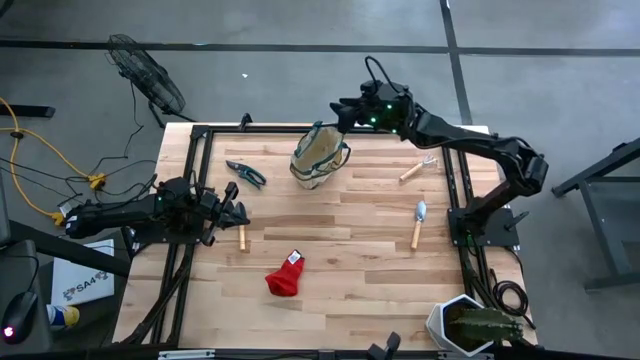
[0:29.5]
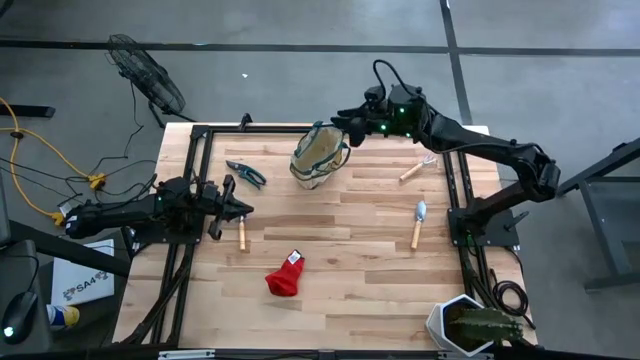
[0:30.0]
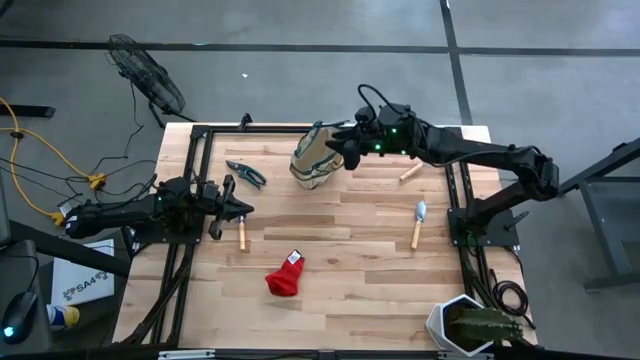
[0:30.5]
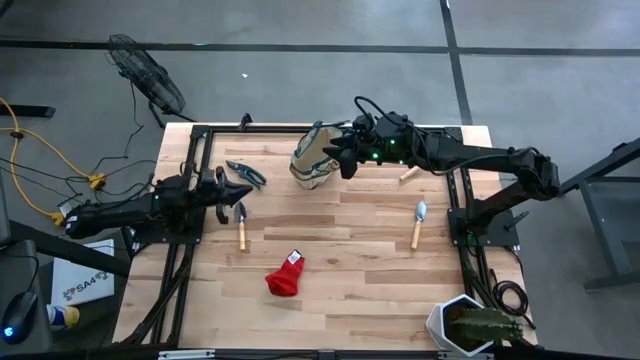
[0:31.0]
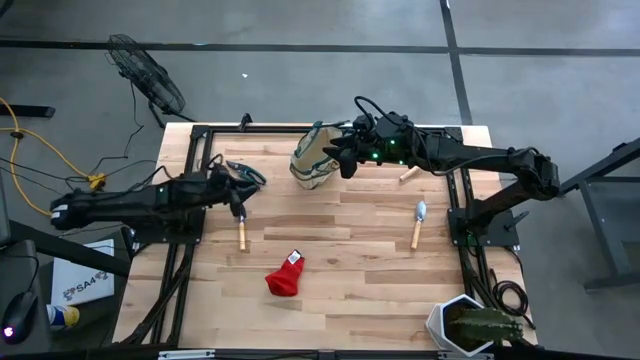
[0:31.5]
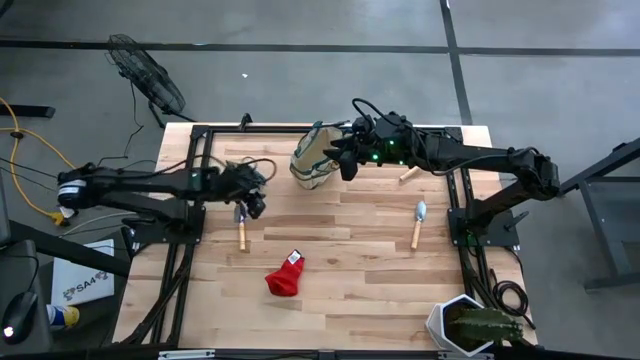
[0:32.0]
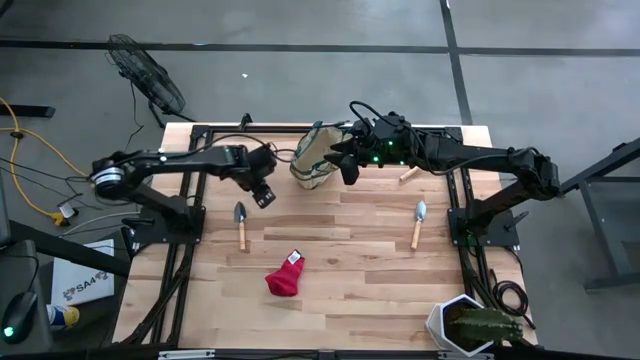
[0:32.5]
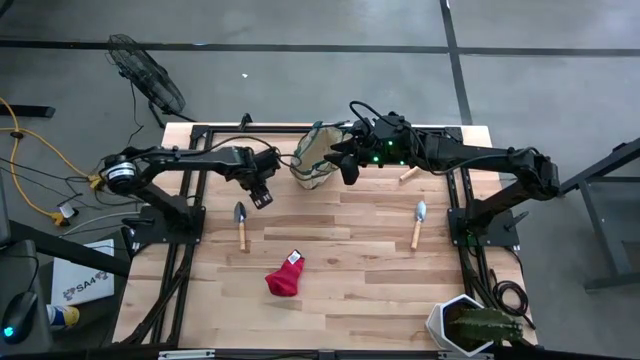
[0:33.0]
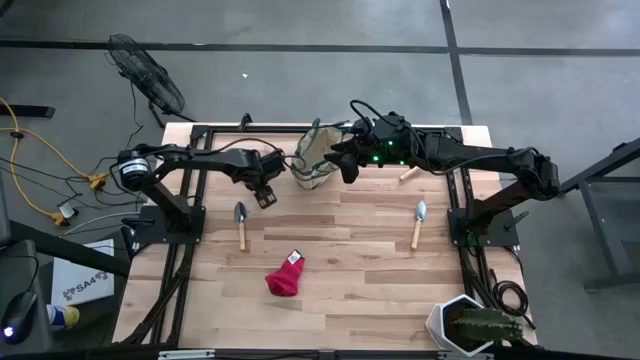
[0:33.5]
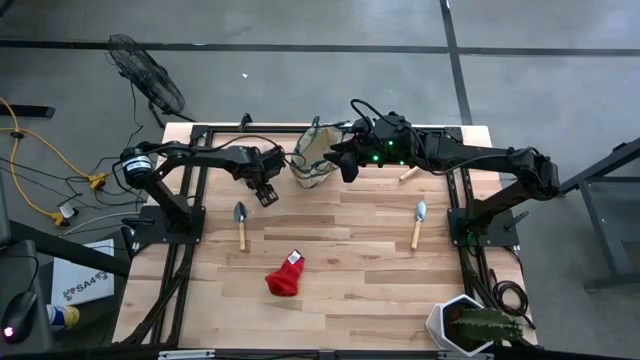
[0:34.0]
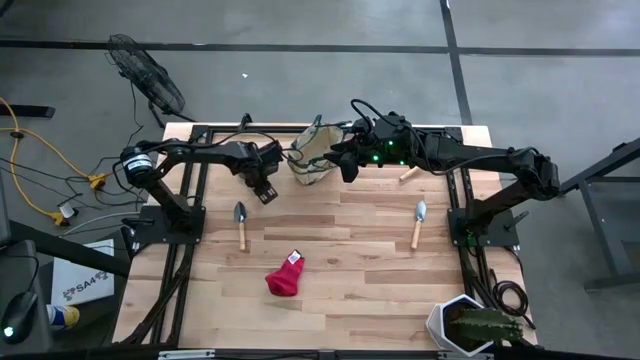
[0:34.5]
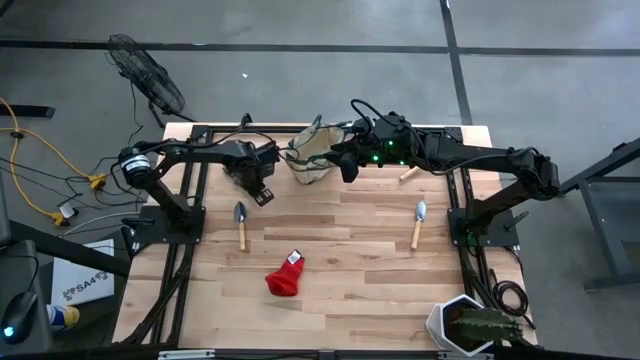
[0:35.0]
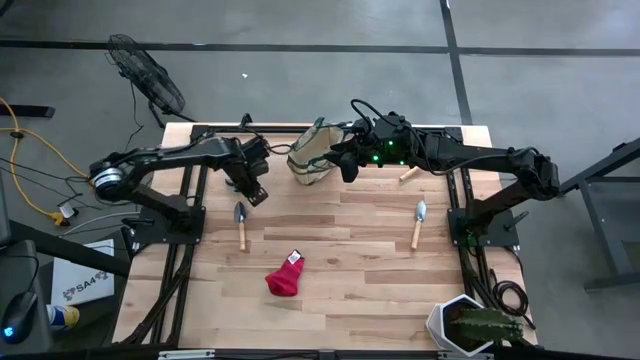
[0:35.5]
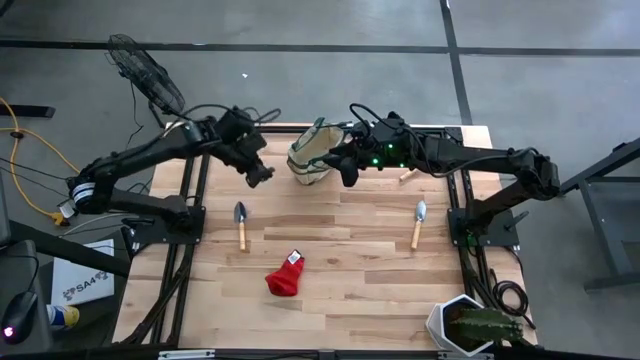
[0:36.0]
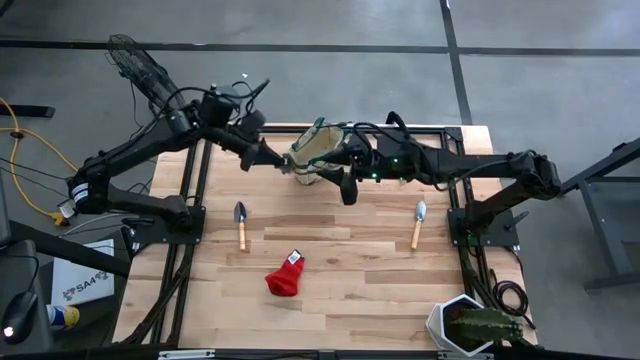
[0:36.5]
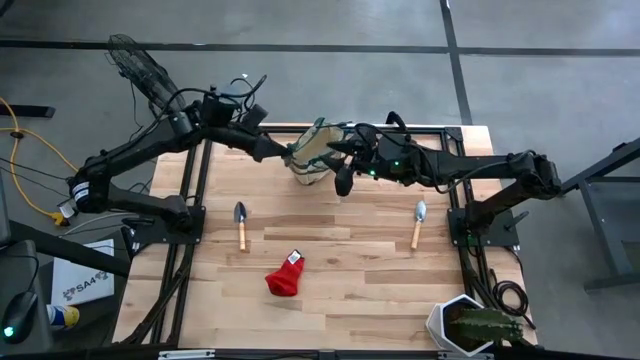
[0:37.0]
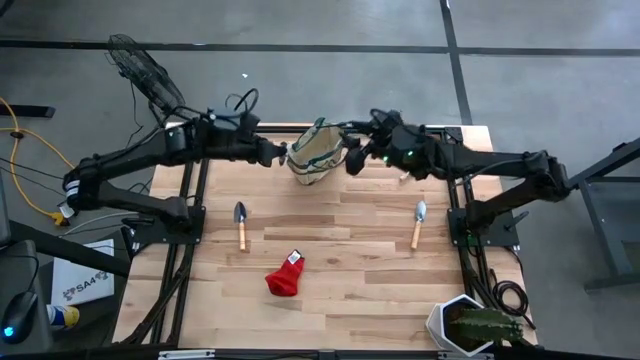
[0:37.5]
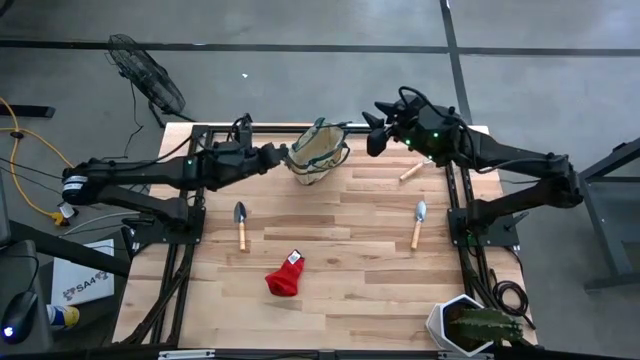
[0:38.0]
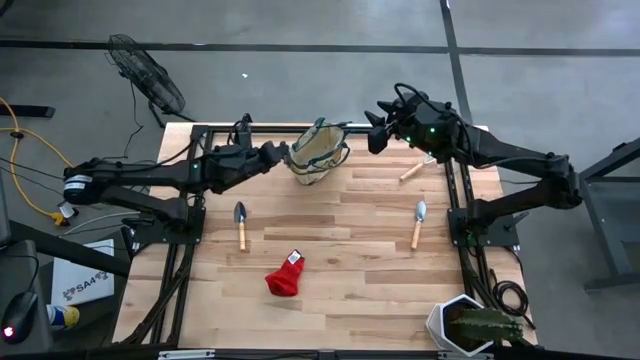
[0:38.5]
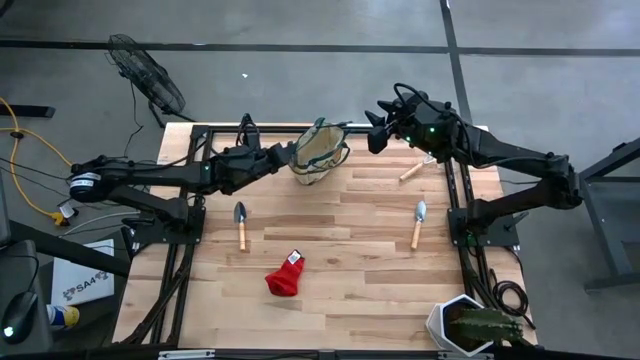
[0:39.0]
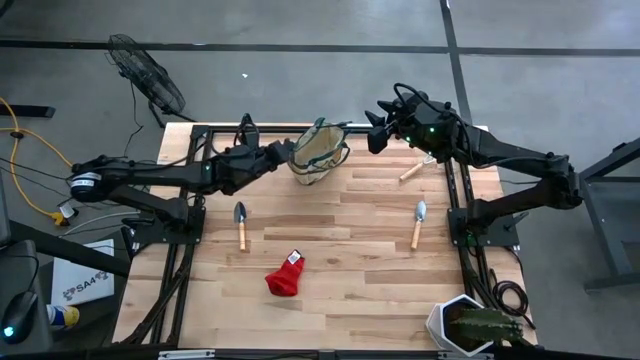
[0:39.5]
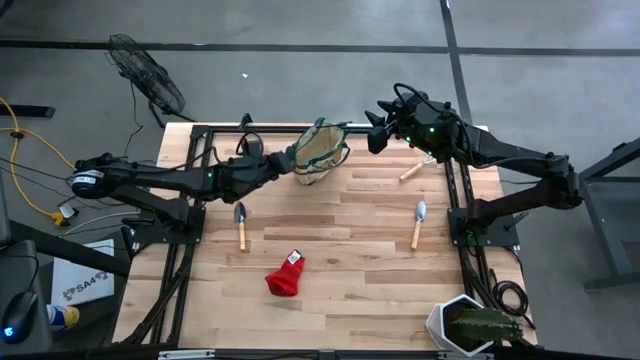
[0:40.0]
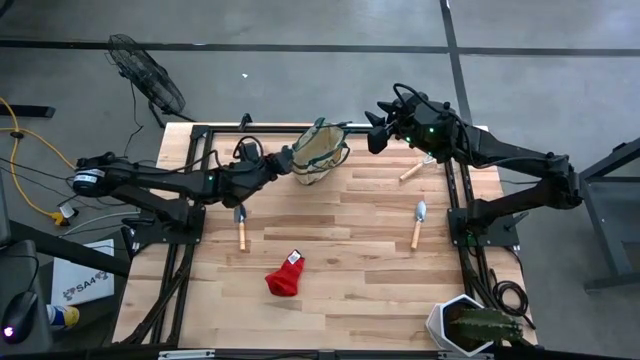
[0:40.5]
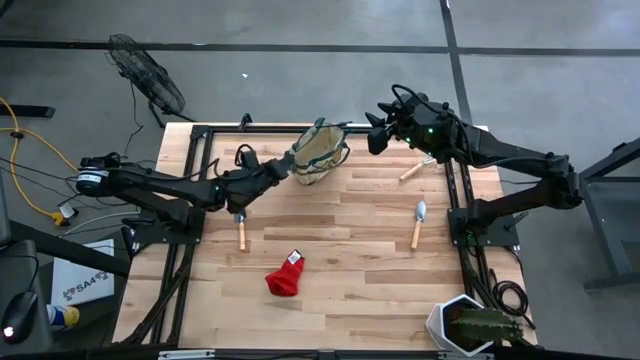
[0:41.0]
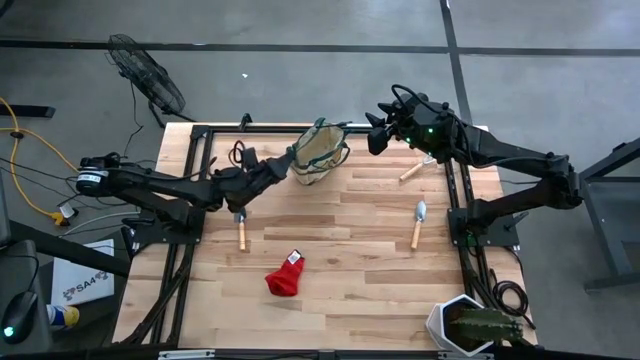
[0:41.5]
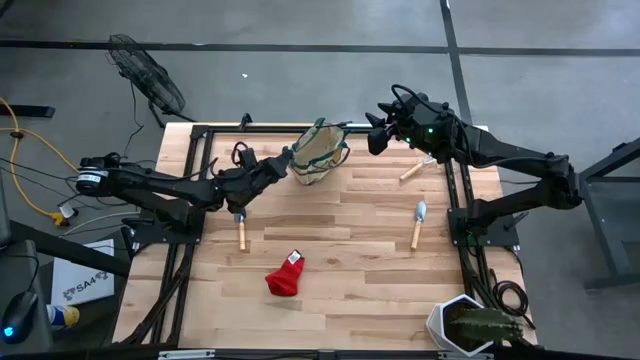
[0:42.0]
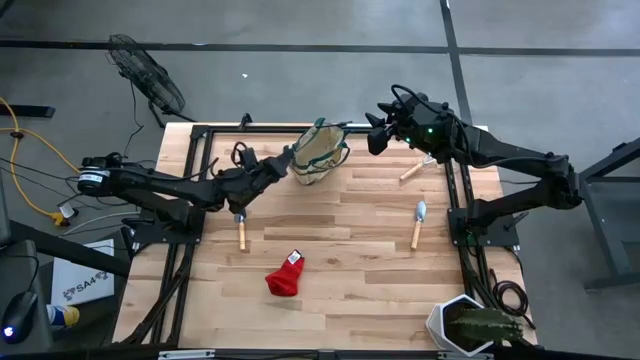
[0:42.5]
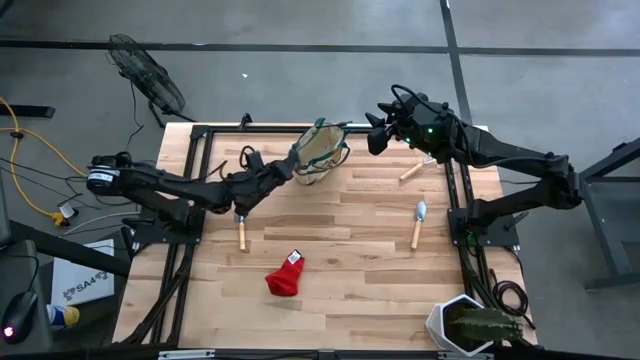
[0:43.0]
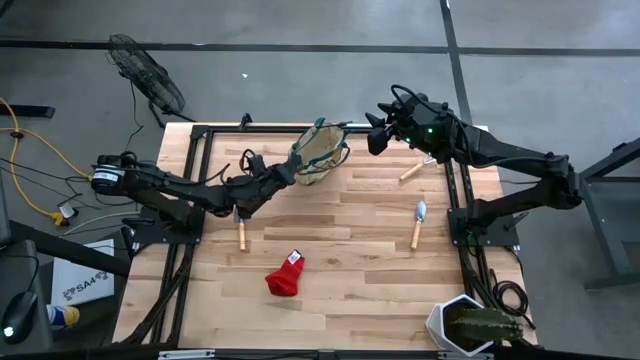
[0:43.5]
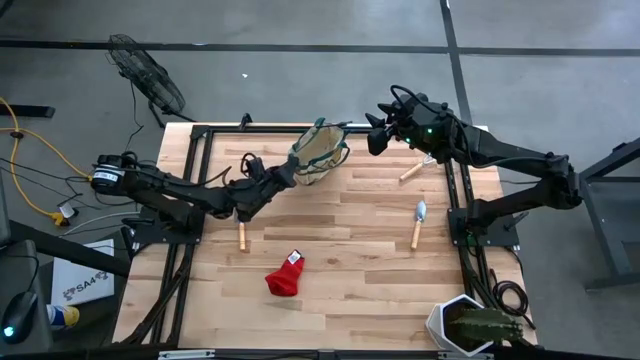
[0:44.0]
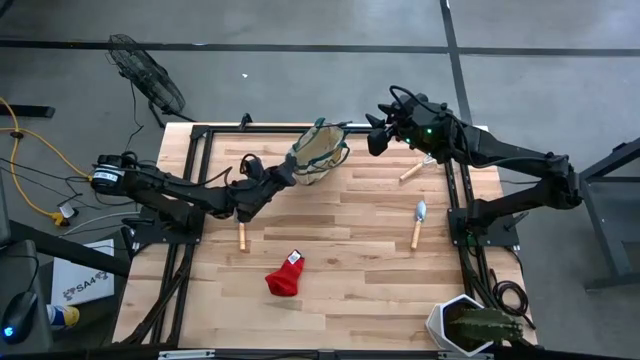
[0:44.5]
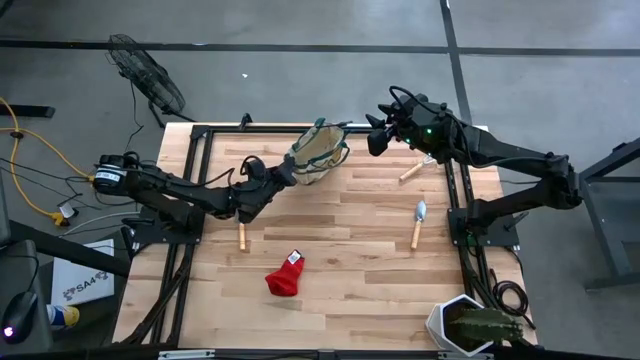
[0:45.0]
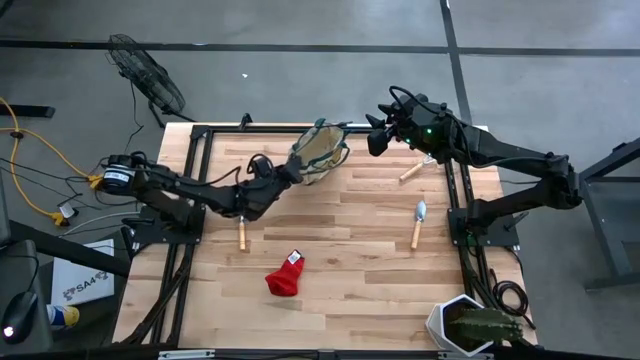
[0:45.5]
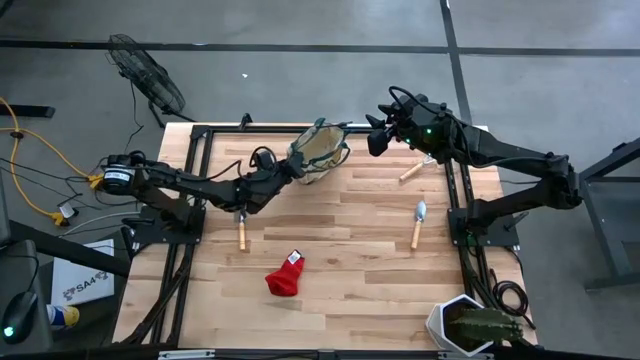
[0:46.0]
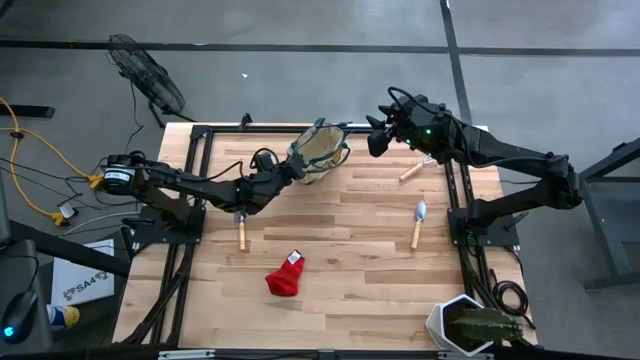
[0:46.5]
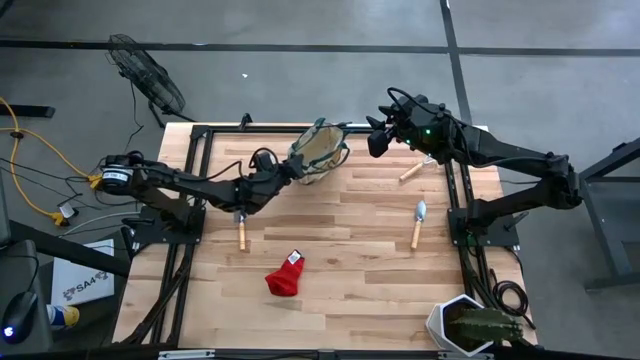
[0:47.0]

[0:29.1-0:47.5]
Task: Pick & Place Garden tools in Gardening bag
Put the green shears into the white gardening bag

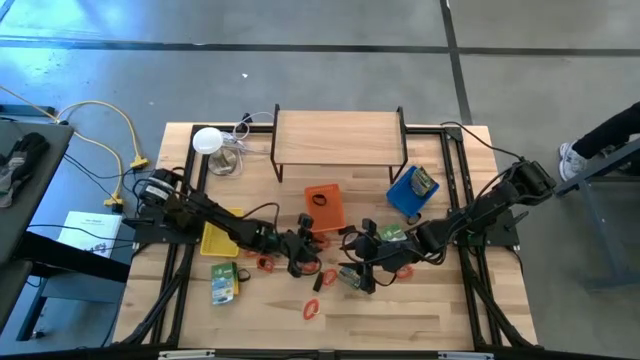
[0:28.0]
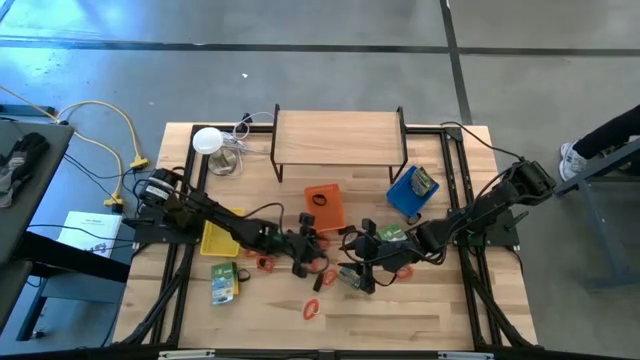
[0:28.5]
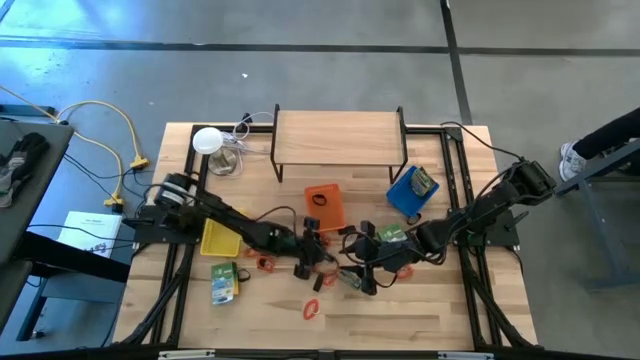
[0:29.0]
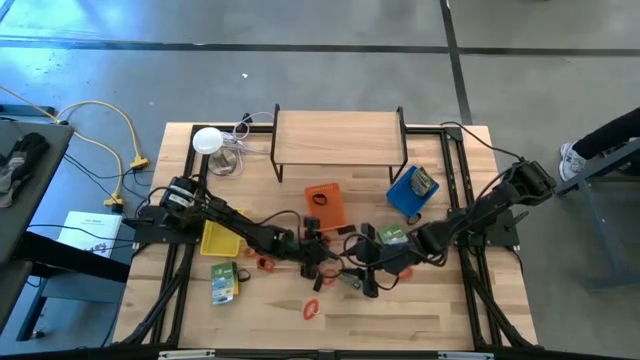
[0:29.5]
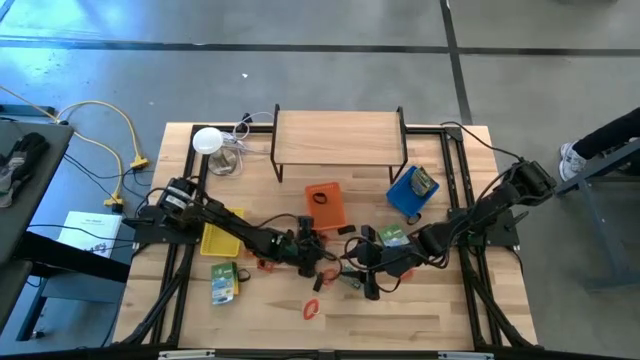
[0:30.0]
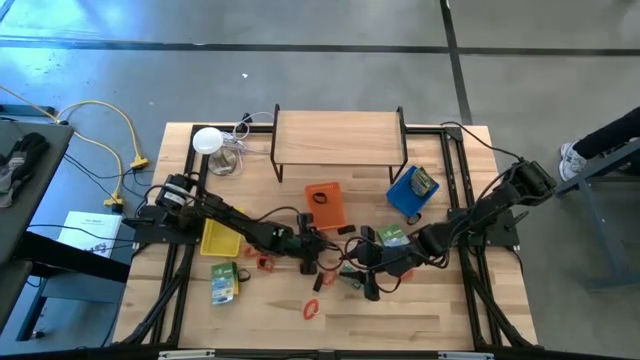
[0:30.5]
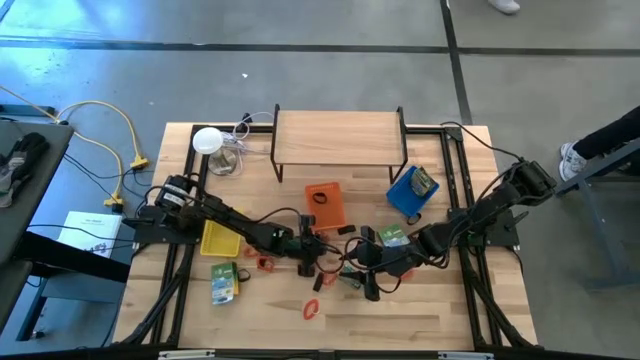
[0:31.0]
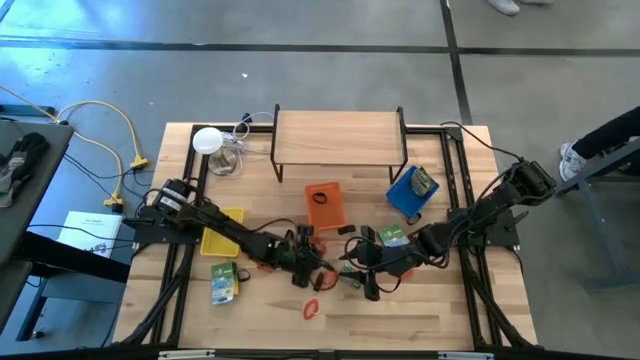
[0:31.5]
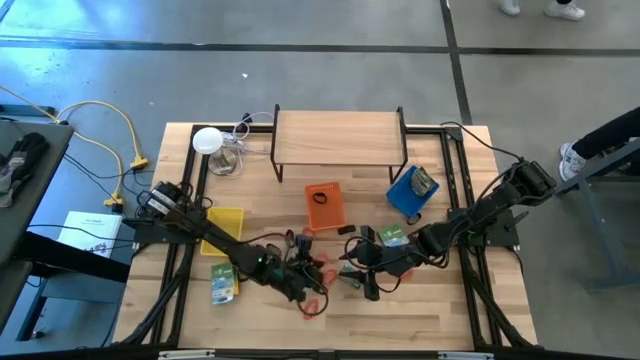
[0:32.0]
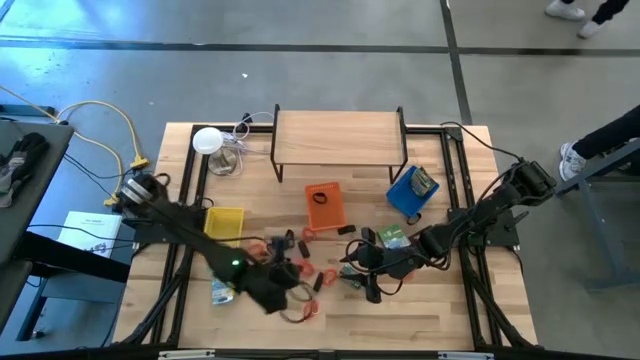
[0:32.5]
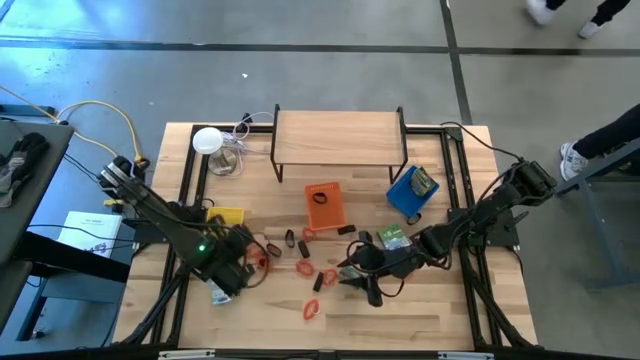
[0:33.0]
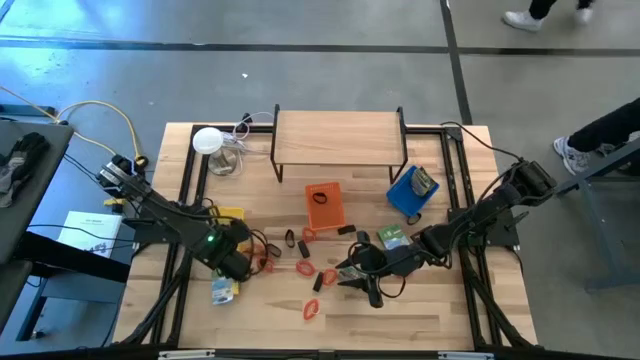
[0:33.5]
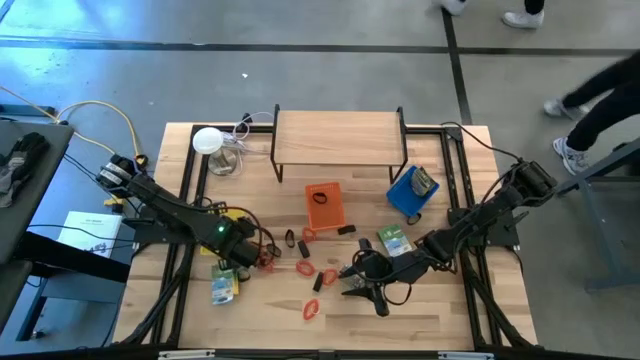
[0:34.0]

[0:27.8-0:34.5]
Task: Pick & Place Office Desk Supplies
Put the orange spring key chain into the yellow bin
